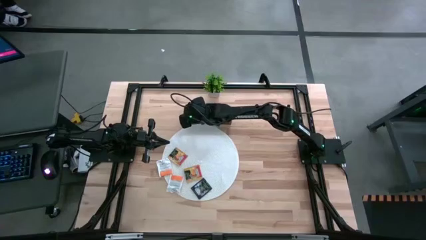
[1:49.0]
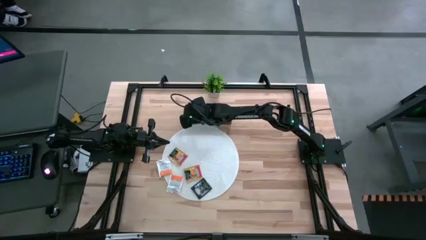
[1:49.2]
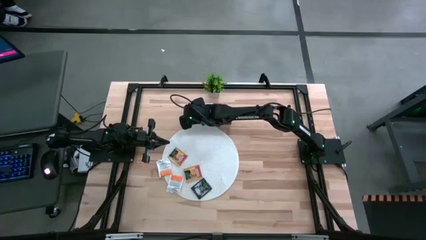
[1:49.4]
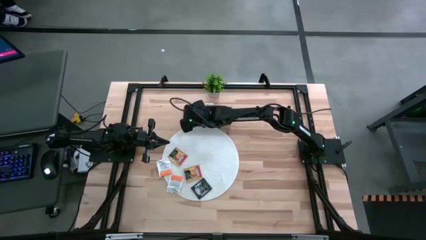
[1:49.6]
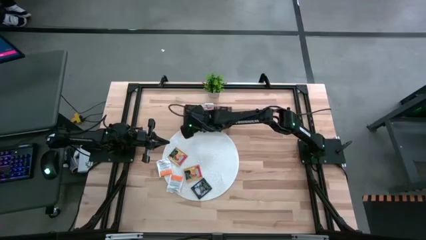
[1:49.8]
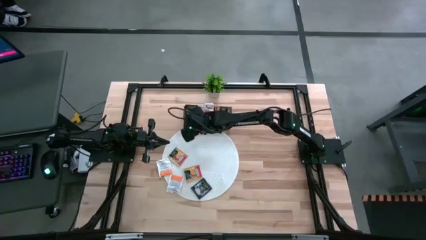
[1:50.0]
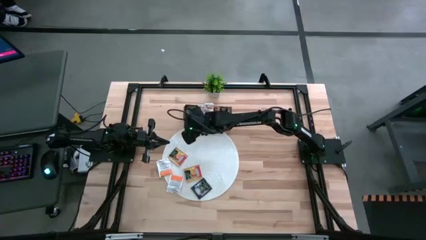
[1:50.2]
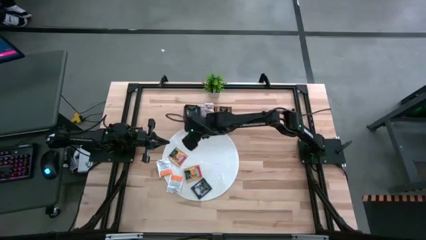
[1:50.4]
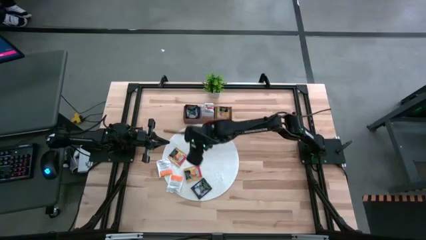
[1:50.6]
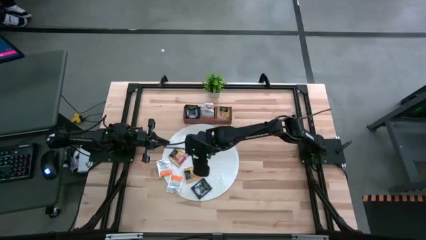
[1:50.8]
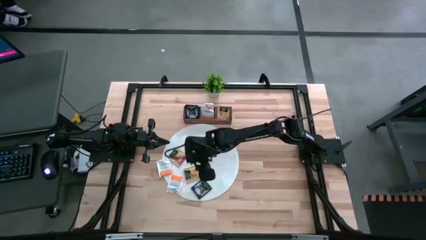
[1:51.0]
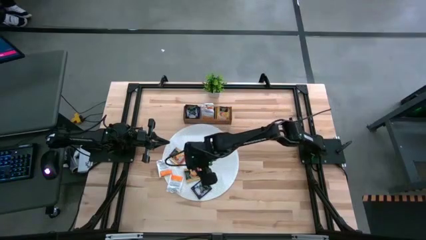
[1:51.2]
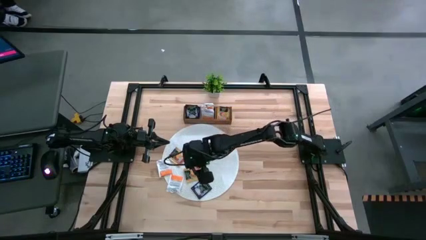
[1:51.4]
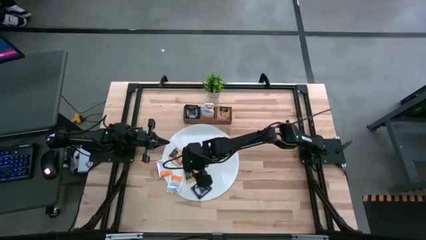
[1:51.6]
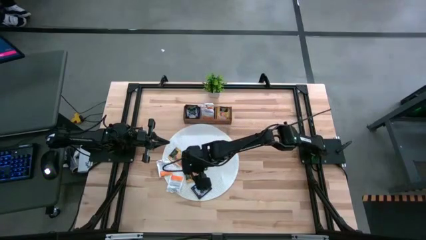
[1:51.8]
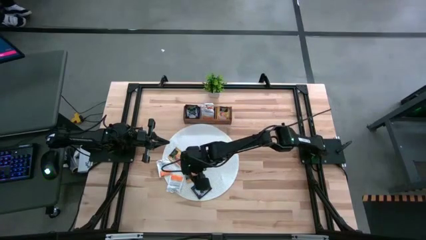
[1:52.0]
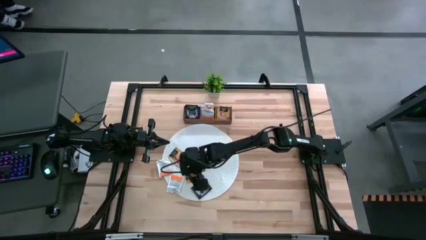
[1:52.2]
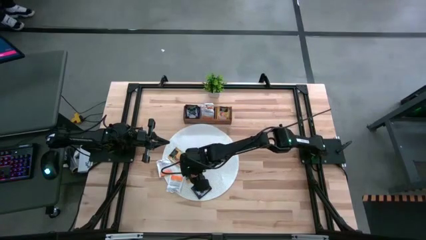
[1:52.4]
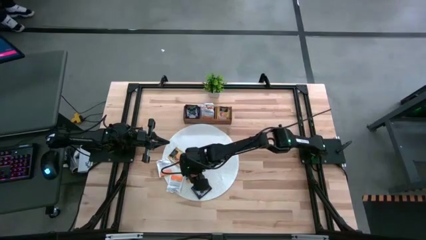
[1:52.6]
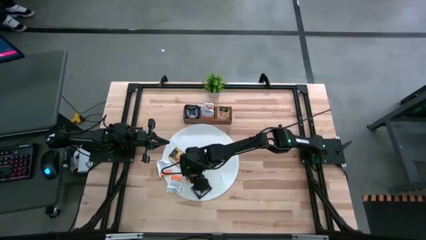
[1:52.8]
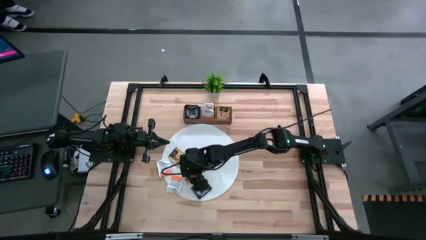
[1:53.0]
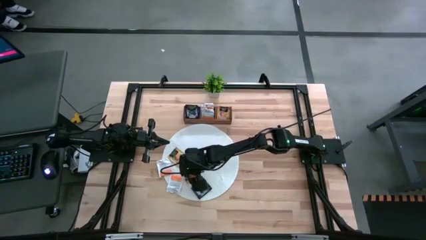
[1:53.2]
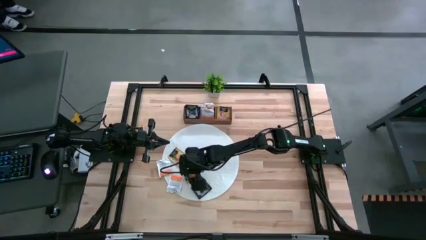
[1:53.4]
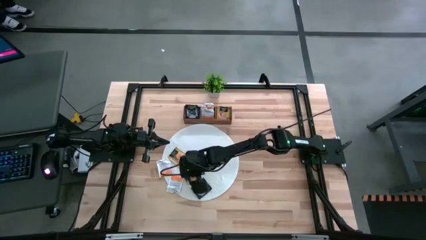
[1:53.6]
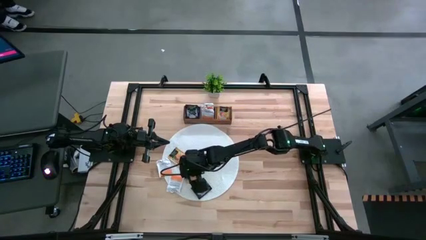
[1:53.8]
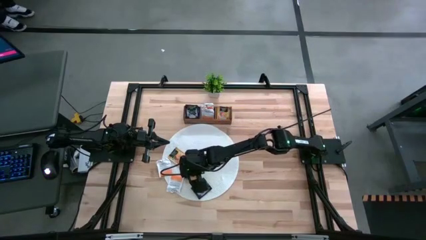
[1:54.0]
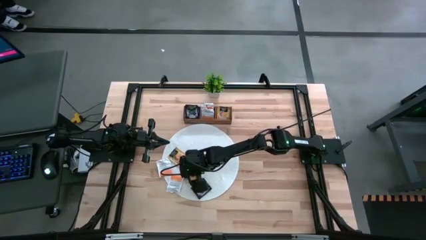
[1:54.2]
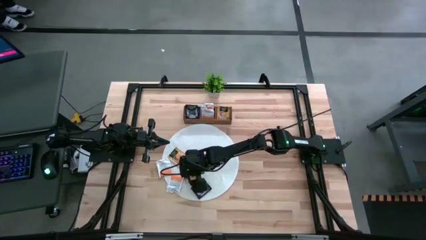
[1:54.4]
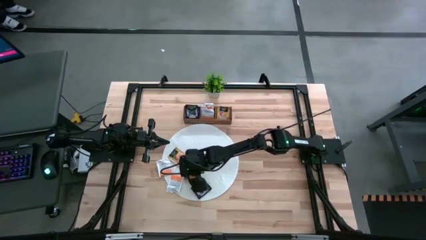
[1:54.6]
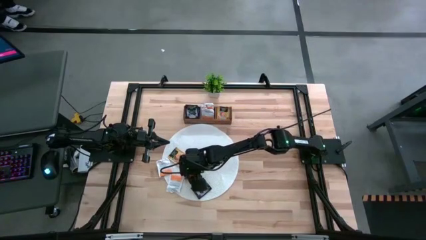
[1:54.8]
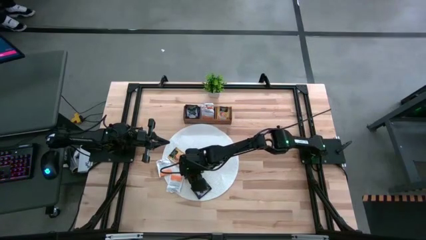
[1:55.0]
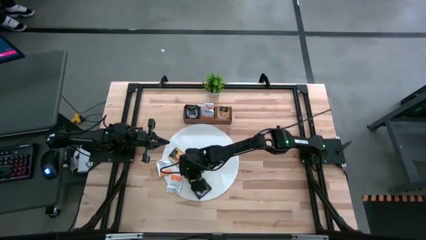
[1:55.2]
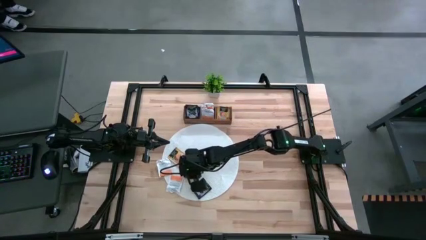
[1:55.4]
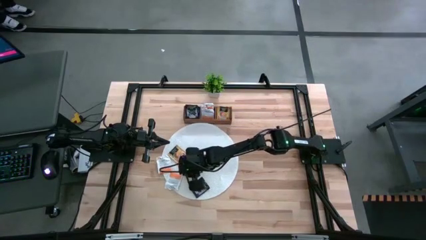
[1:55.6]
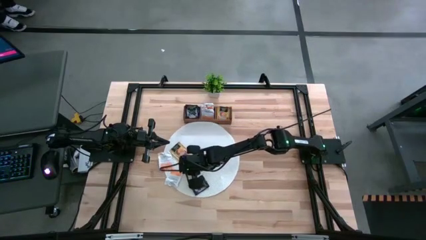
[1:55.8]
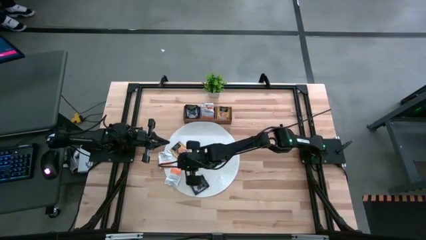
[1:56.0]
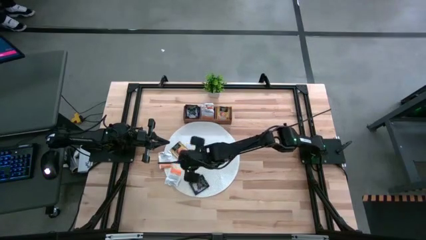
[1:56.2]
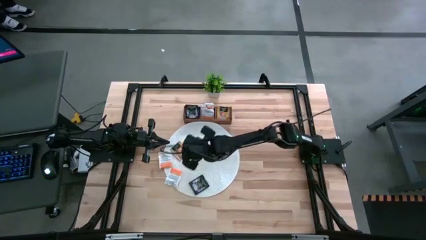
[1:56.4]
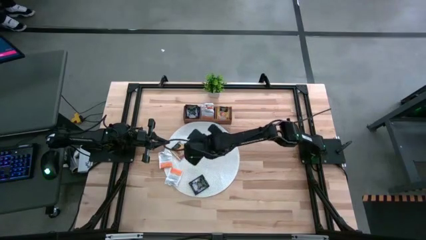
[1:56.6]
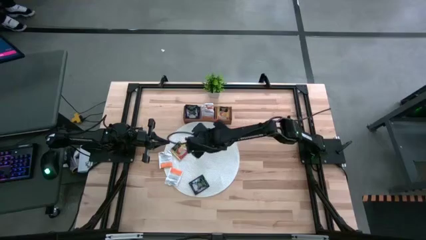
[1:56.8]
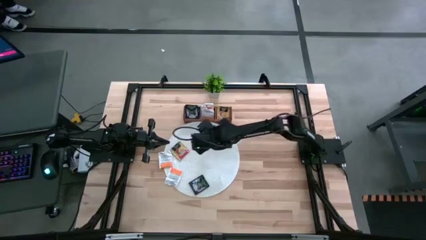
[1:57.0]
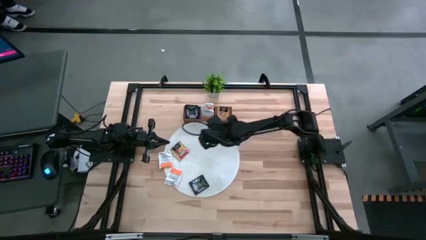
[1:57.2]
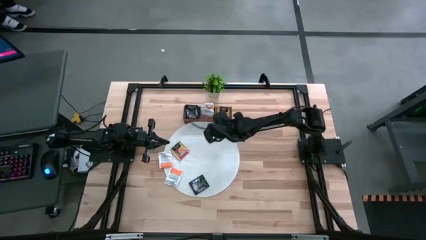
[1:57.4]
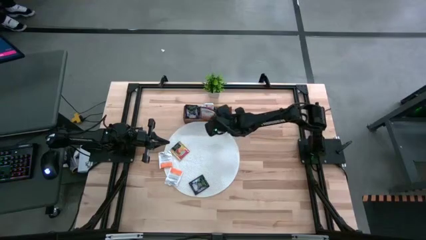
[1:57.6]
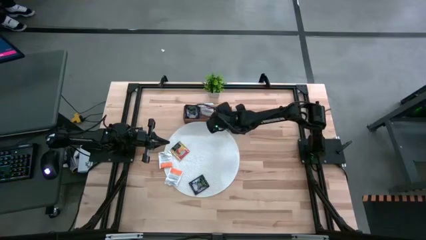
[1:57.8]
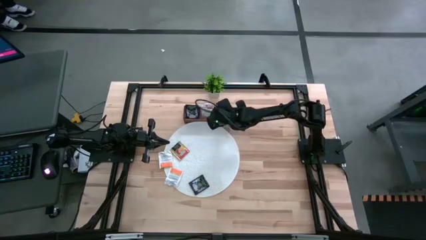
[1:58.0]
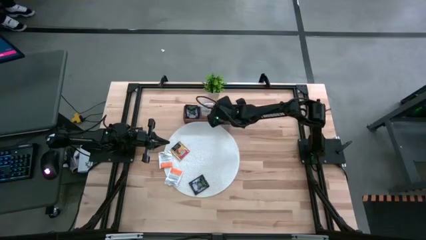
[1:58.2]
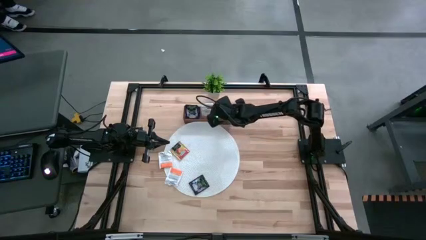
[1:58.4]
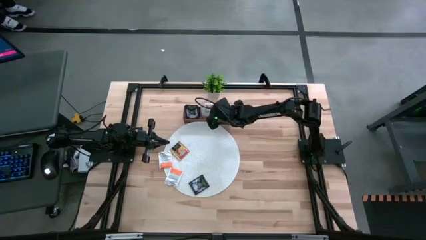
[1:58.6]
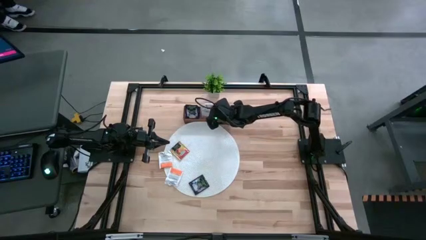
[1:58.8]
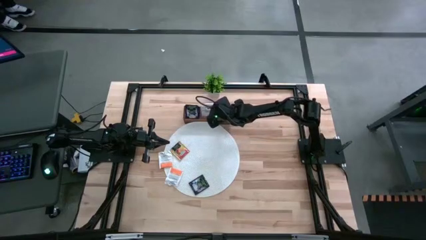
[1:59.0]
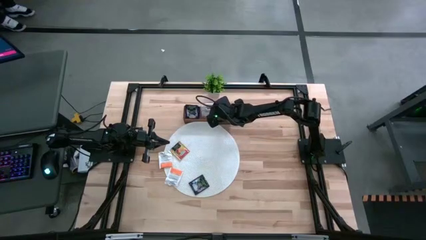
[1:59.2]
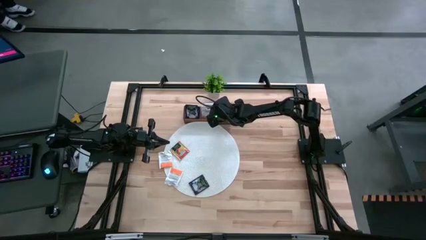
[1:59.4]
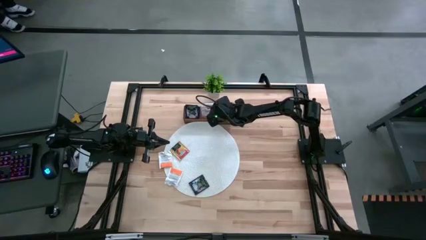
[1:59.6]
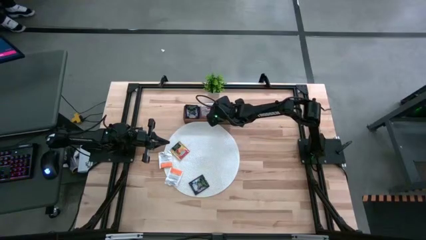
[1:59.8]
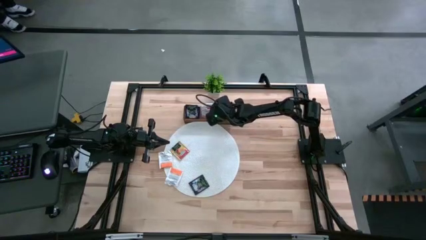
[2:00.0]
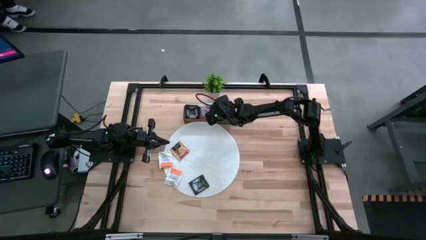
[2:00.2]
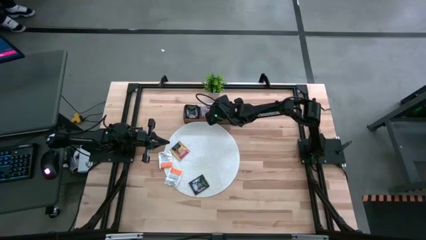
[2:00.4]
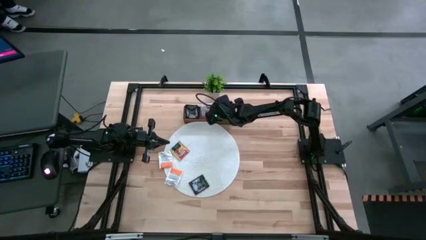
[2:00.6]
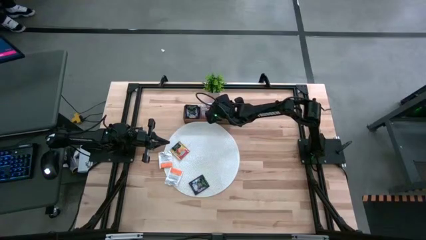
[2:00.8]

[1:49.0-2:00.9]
Task: Pick & Place Tea
Put the yellow tea bag into the right section of the wooden organizer

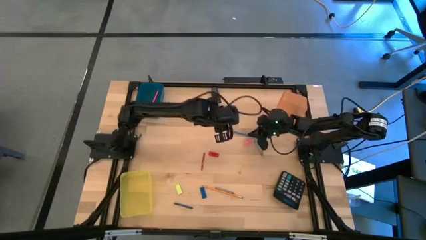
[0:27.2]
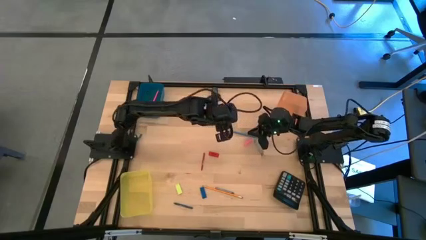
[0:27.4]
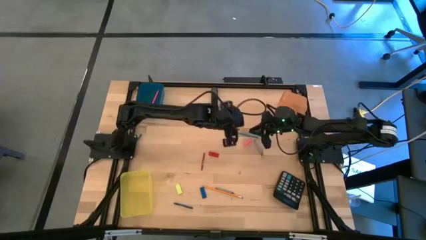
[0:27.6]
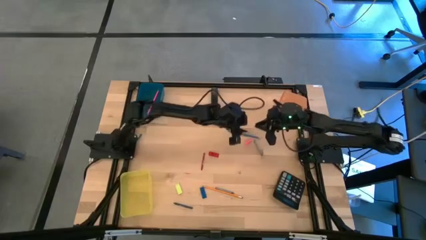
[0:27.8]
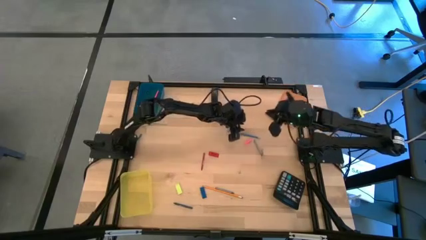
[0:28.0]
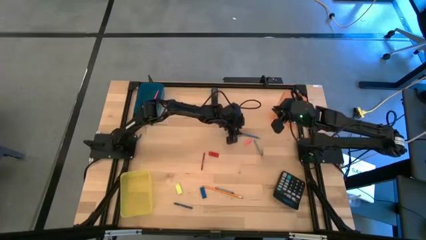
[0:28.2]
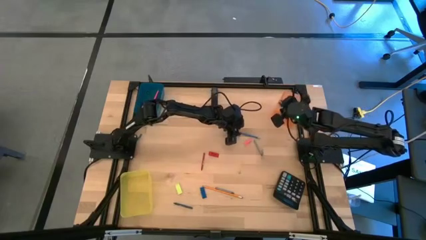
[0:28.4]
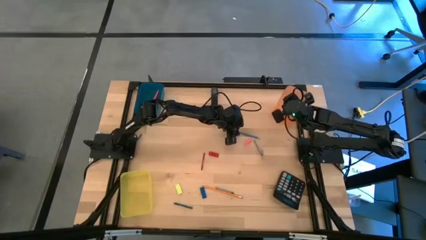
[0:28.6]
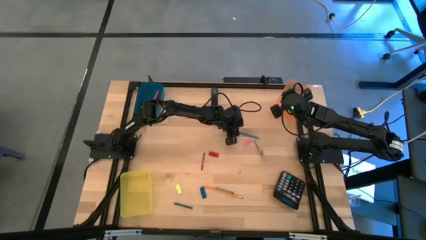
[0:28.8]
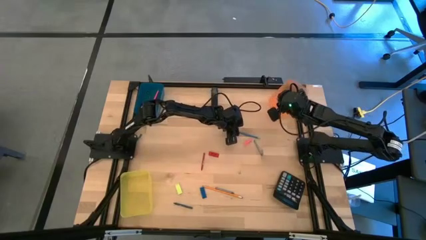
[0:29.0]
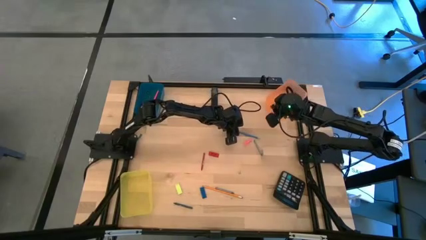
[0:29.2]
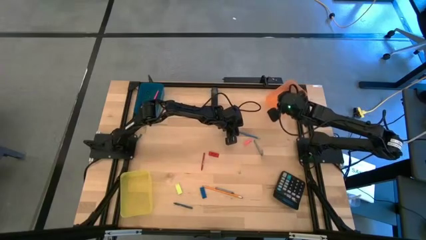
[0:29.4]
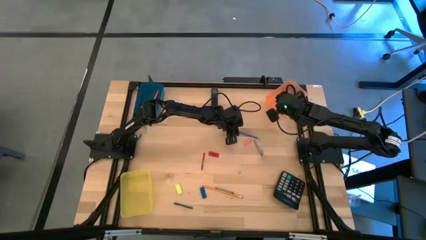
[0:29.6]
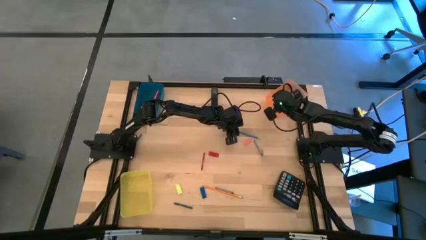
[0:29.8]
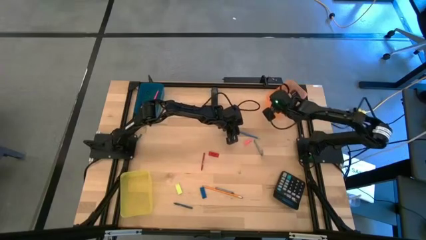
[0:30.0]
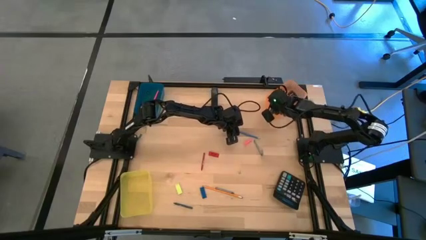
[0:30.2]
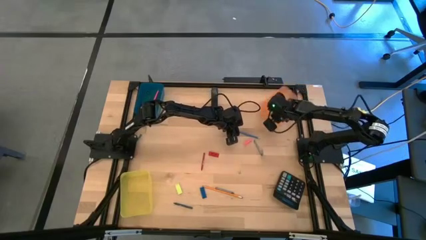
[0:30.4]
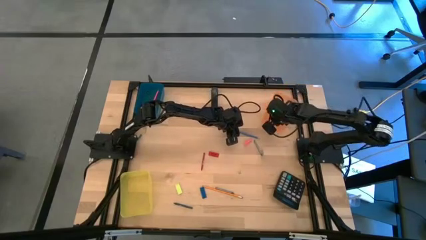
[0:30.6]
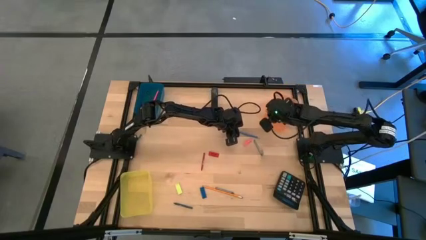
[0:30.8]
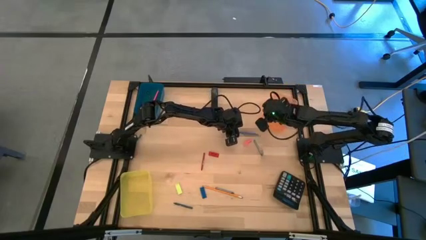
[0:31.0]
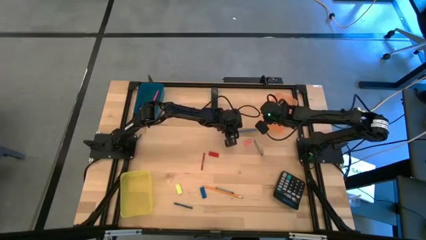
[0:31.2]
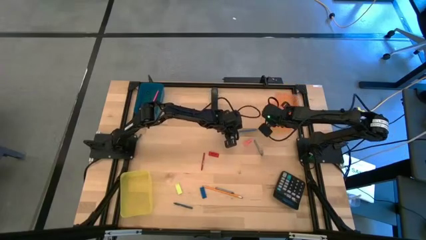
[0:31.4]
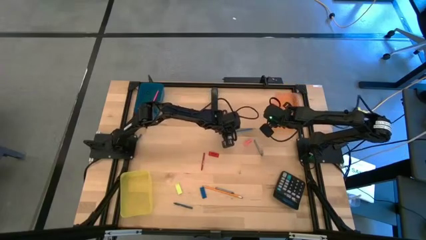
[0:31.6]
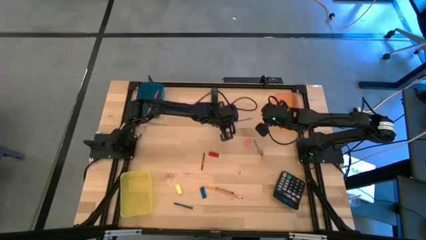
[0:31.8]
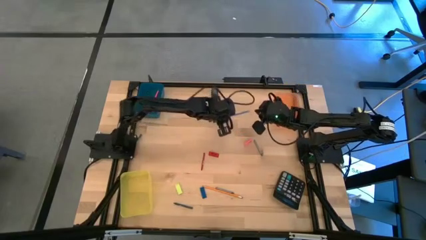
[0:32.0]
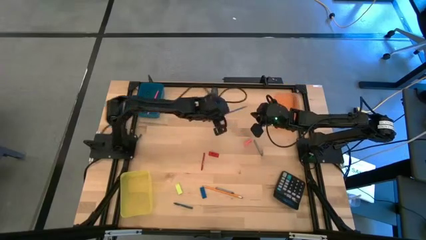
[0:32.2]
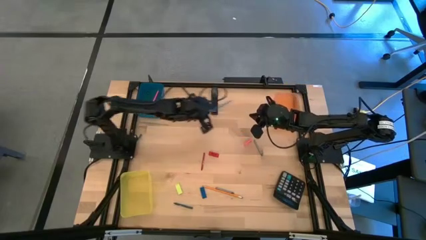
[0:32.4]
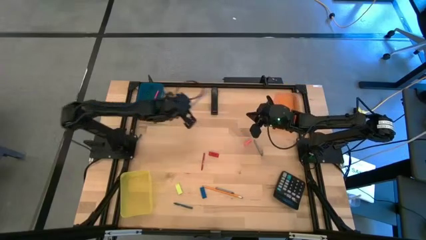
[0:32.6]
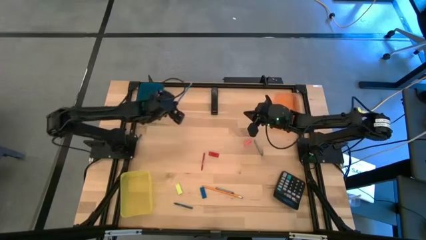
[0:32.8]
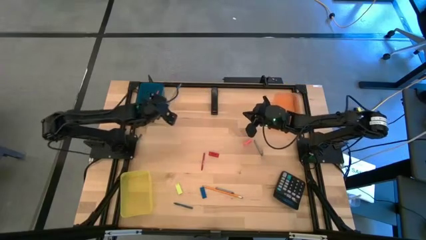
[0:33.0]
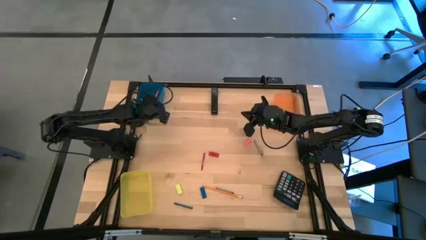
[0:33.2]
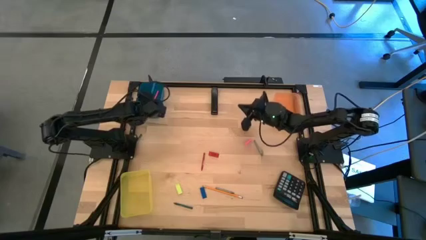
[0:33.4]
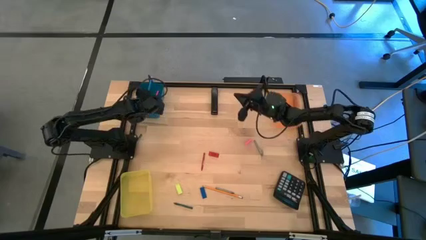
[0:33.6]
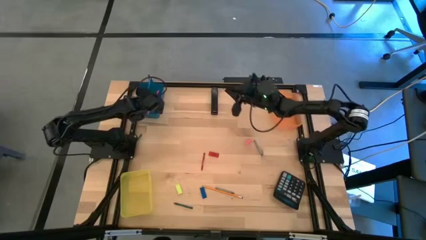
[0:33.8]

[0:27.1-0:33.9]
Task: Sort crayons/erasers/pens/pencils in bins
Put the blue pencil into the blue bin
